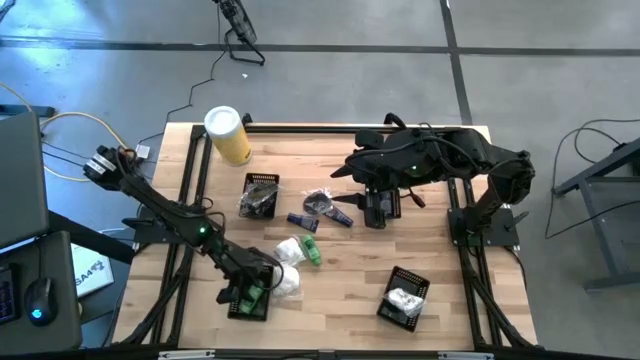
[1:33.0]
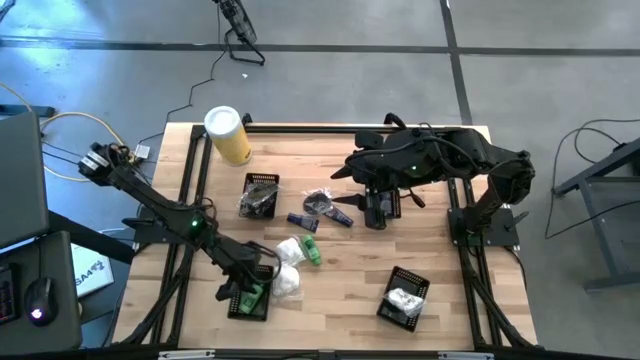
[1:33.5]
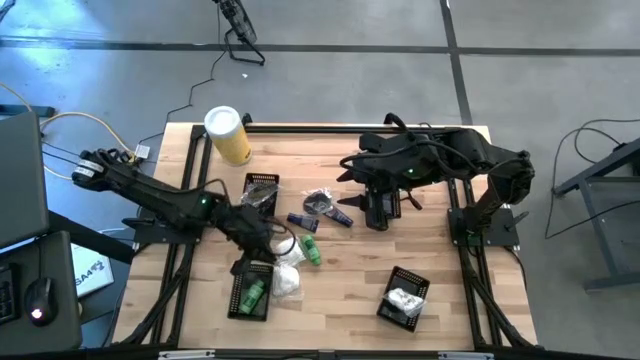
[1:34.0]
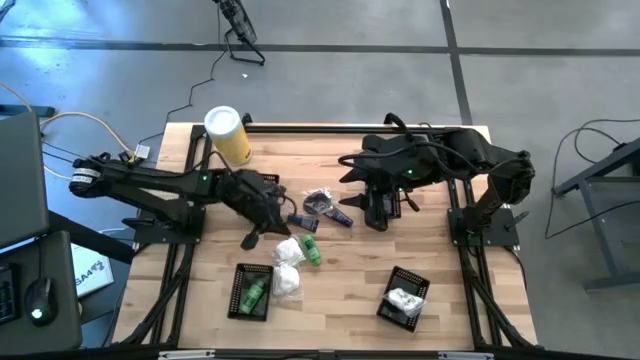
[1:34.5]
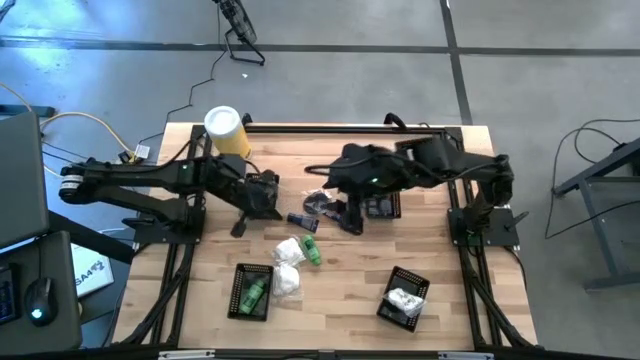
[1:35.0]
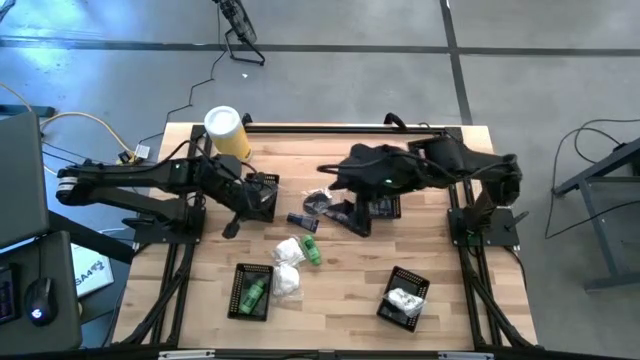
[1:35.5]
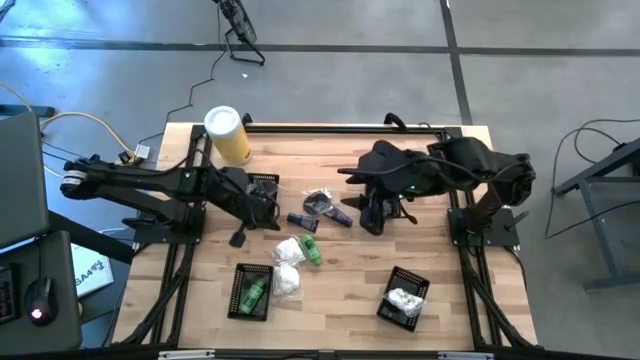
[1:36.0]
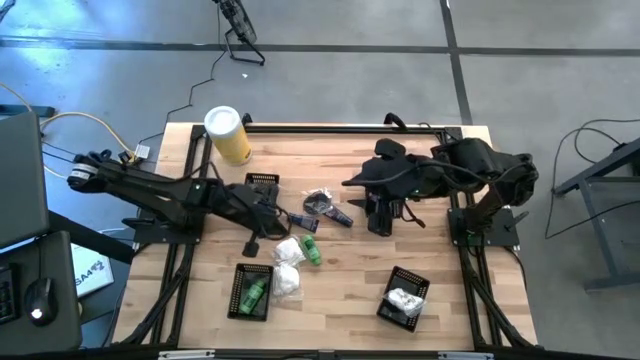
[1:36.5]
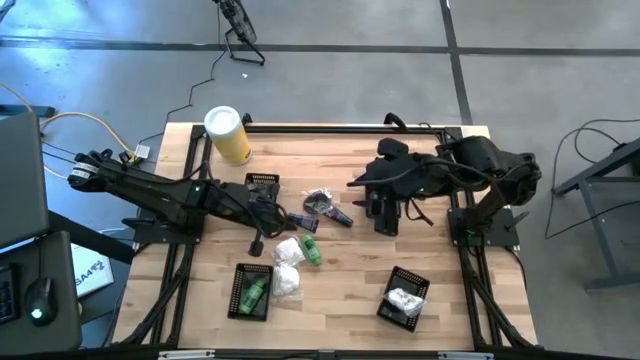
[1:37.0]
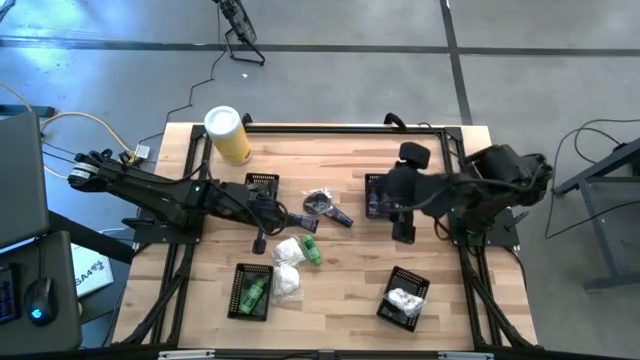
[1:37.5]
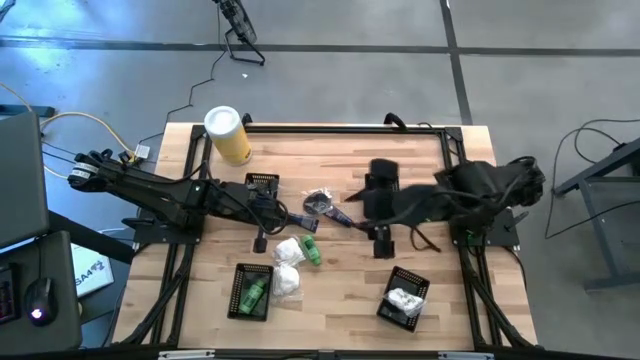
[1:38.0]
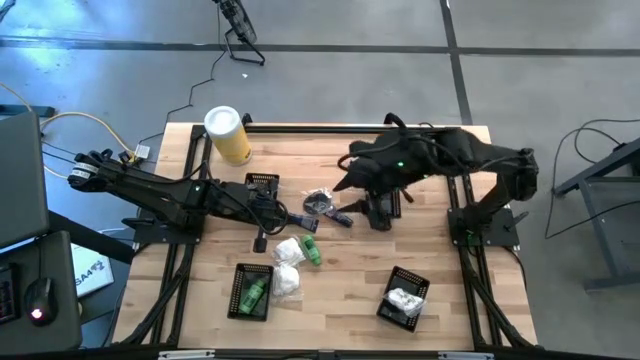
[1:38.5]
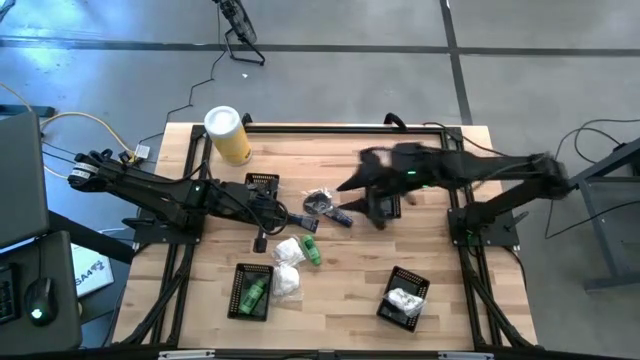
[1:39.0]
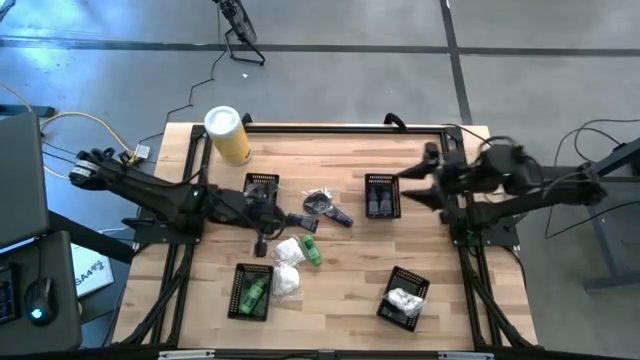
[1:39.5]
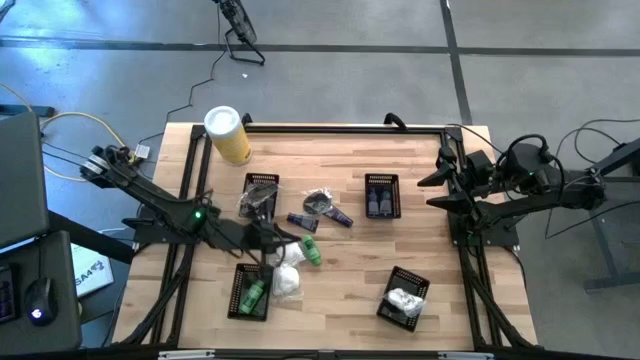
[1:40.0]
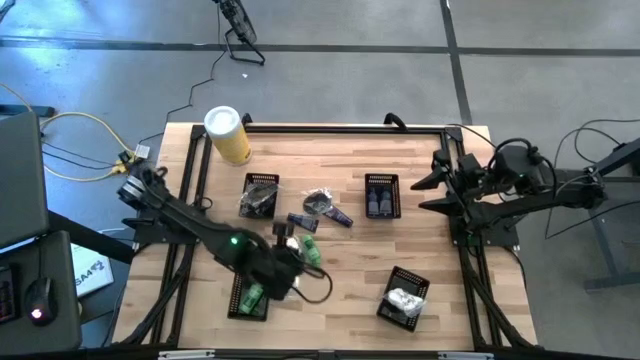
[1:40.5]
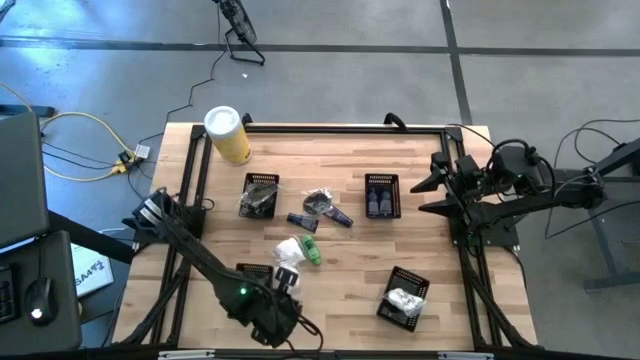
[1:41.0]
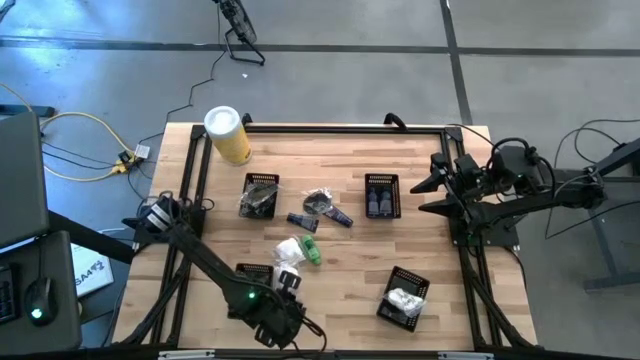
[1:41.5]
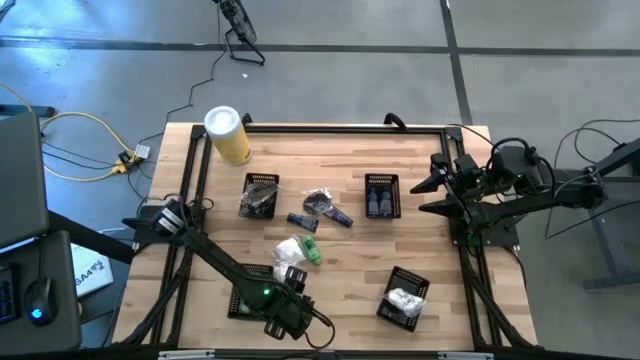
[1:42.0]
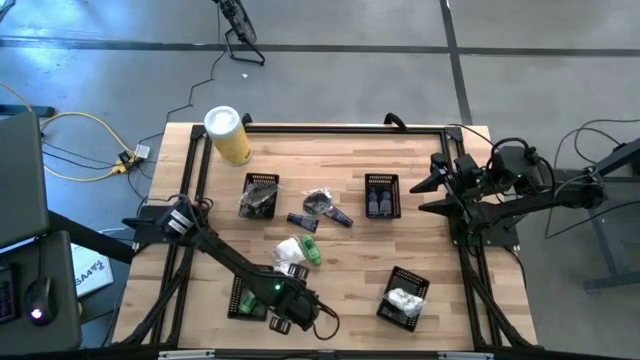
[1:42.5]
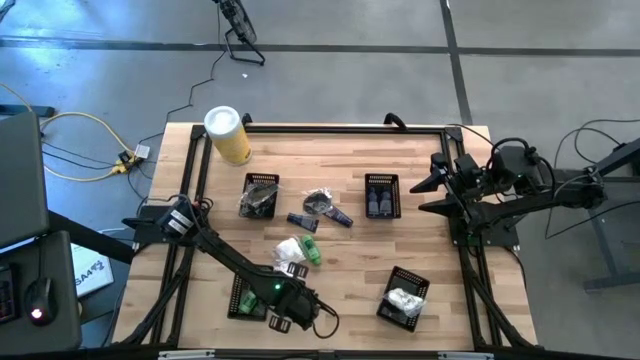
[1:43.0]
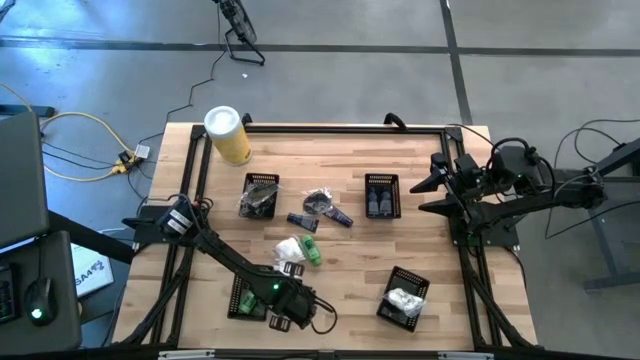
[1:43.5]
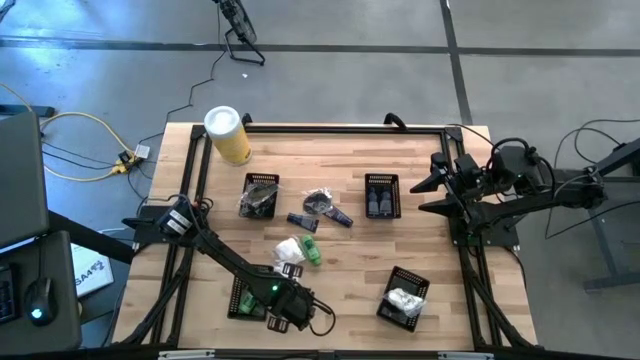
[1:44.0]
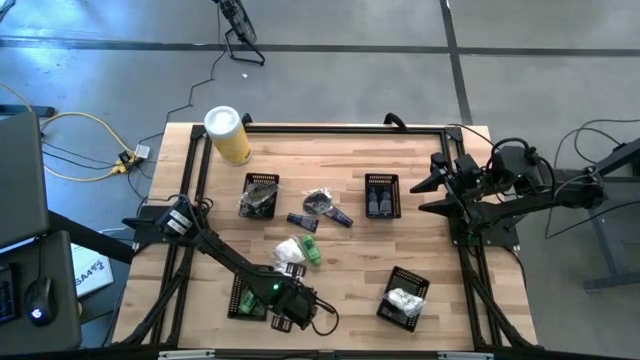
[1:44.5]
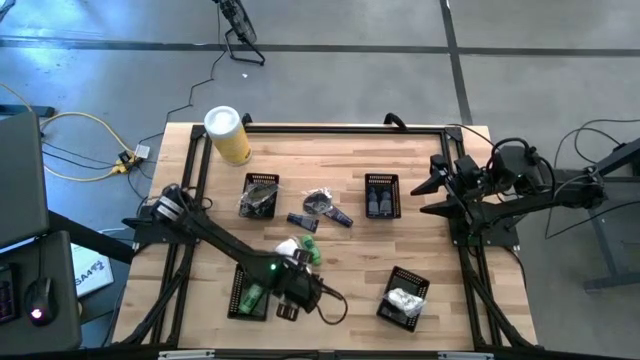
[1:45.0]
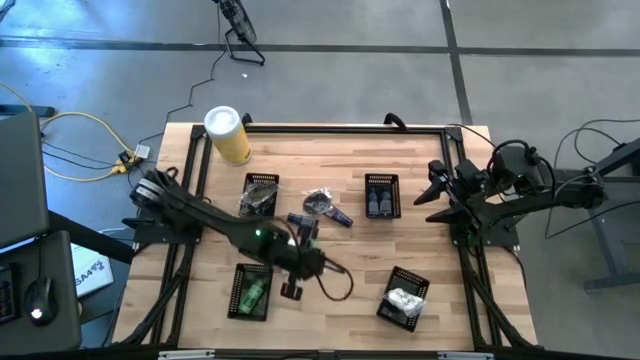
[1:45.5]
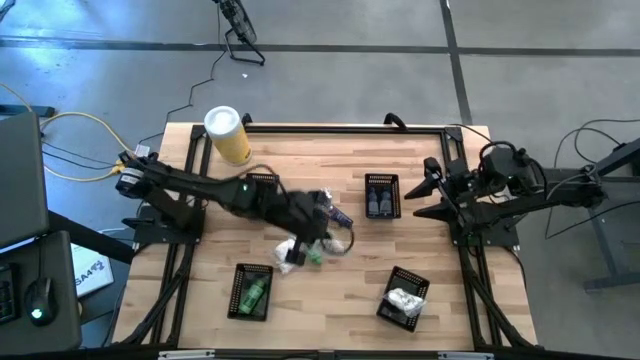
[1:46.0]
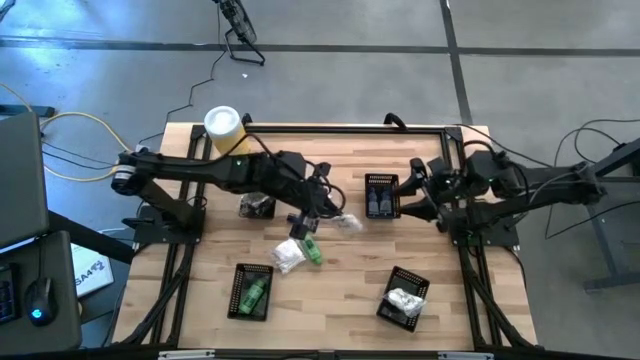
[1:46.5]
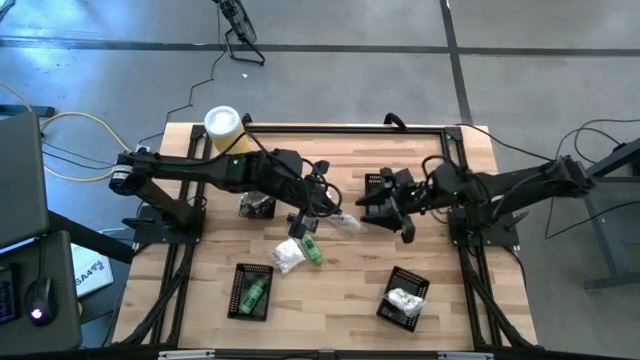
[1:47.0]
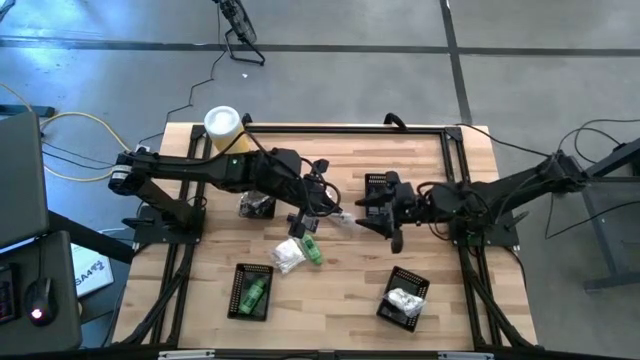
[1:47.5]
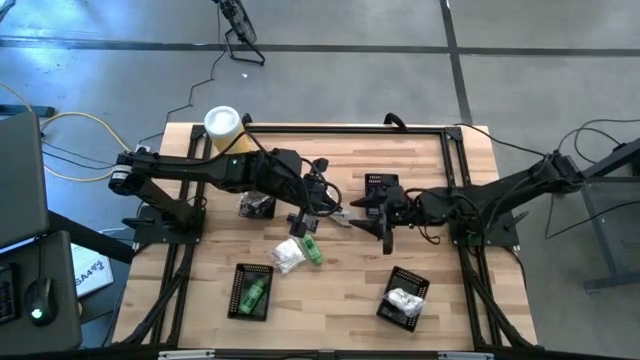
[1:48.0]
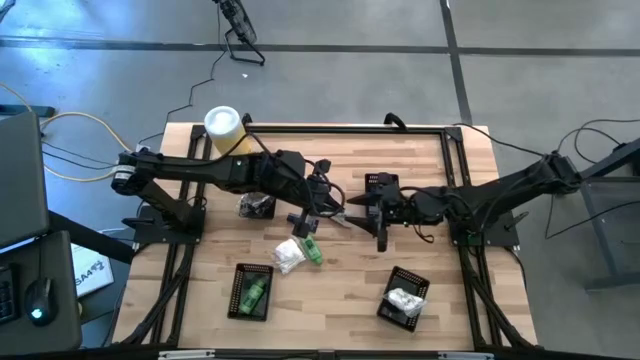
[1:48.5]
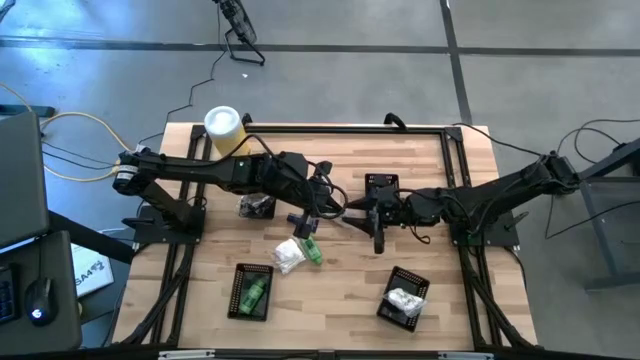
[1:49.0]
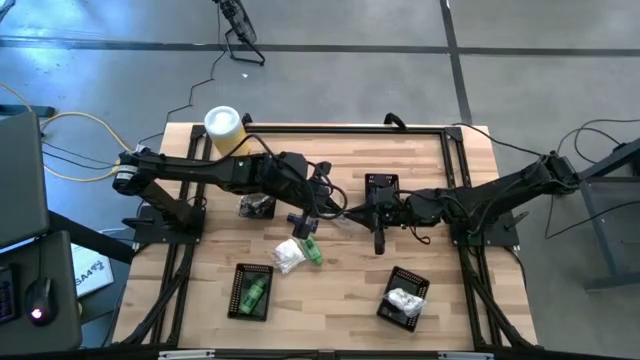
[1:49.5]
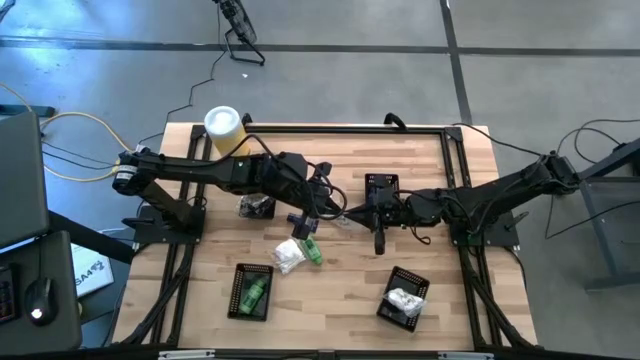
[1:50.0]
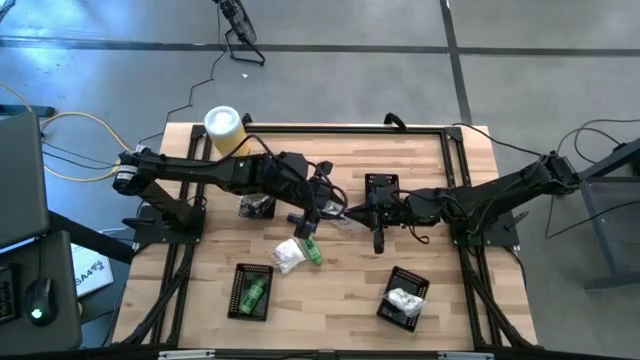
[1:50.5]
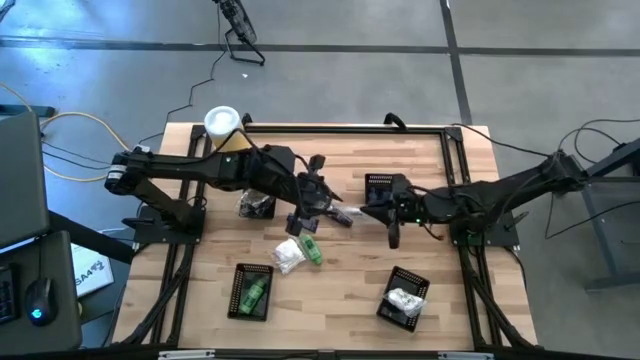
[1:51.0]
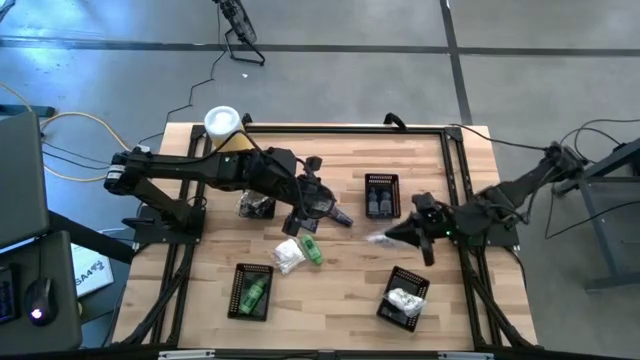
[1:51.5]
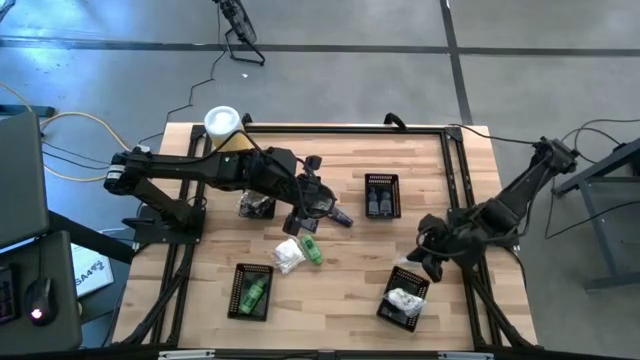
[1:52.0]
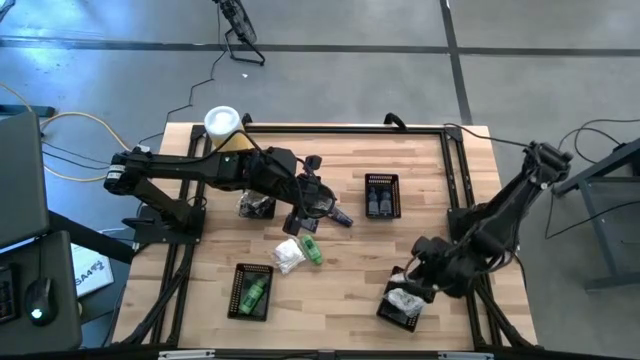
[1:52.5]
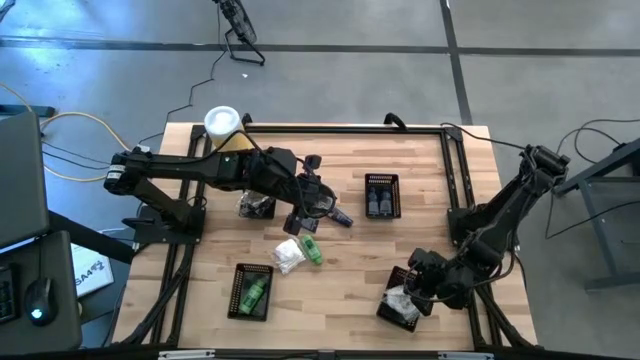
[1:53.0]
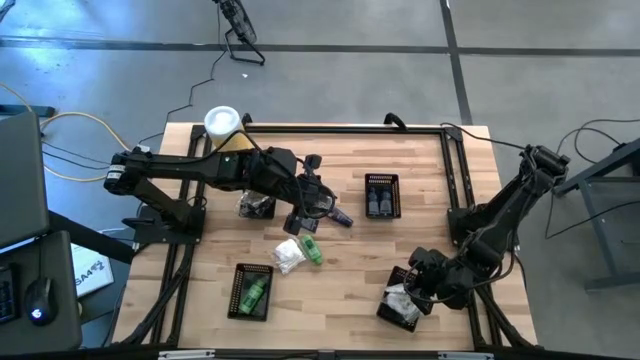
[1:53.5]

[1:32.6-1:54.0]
Task: Pick & Place Travel size toiletries
Put the white cotton pack into the bottom right black basket
